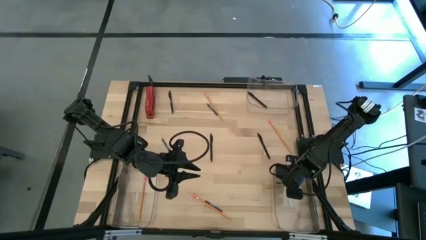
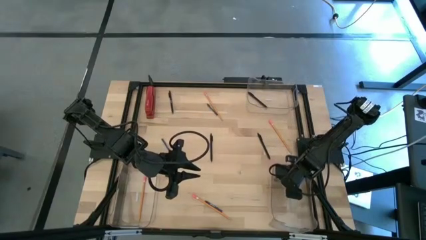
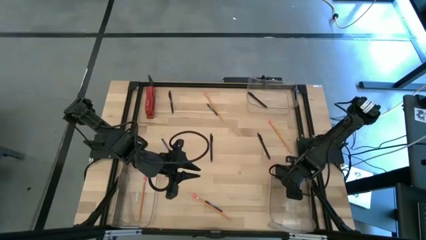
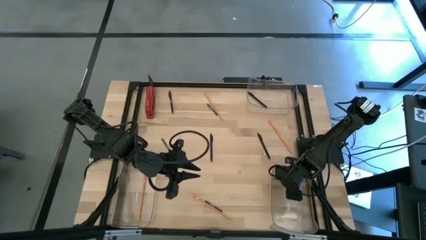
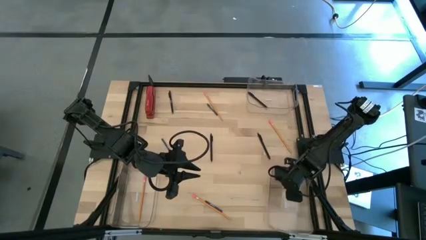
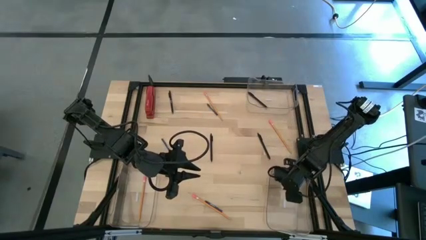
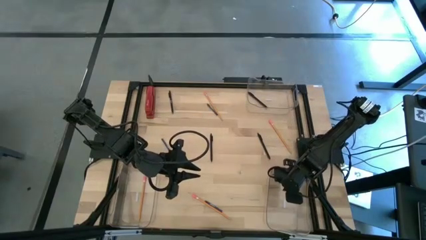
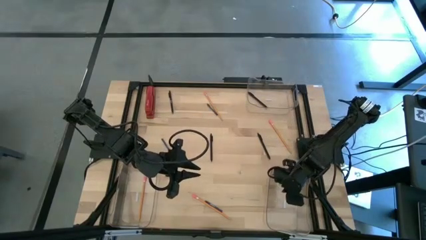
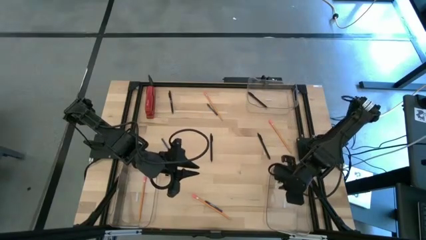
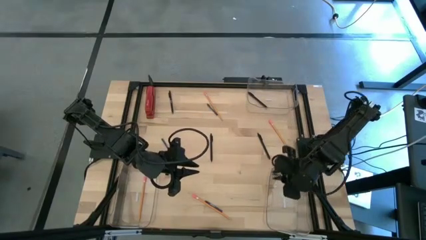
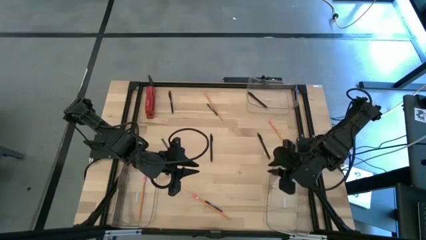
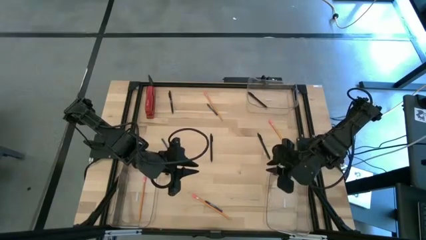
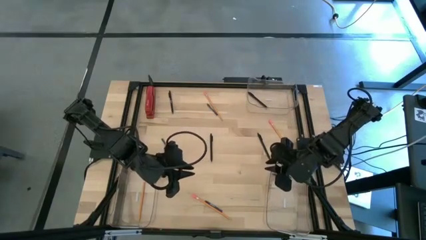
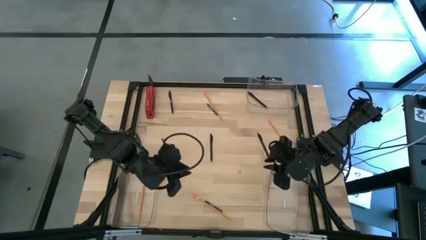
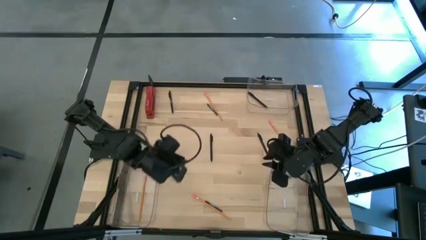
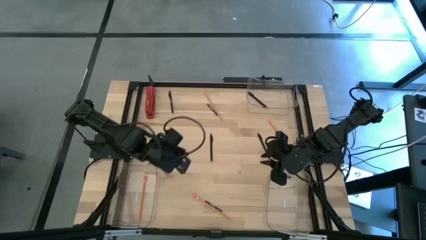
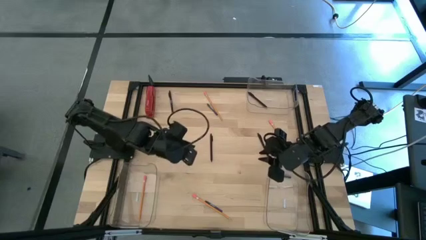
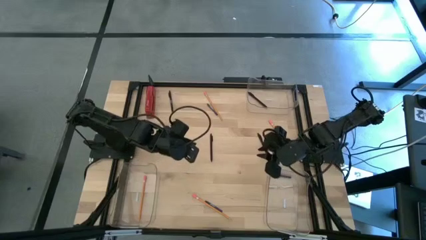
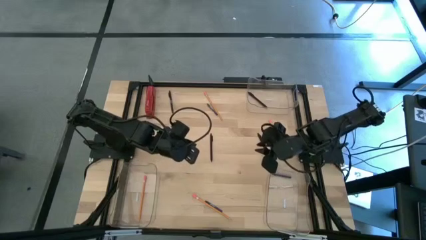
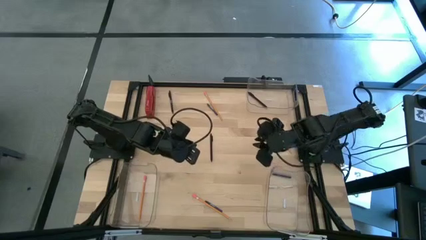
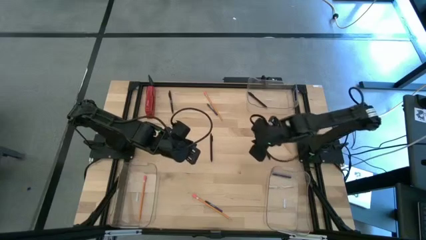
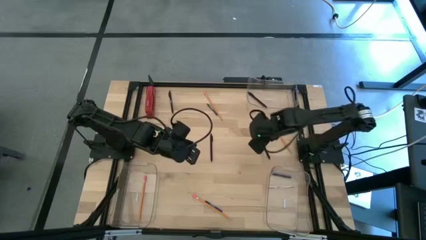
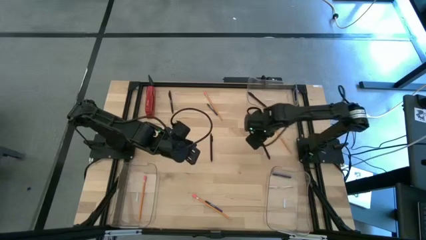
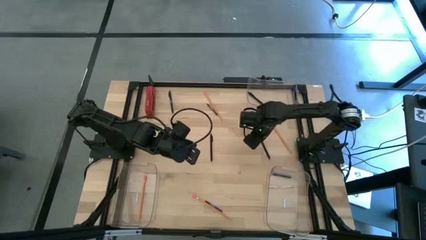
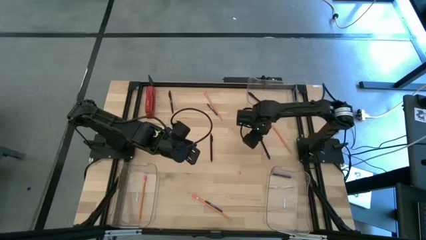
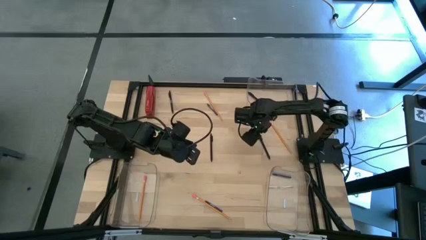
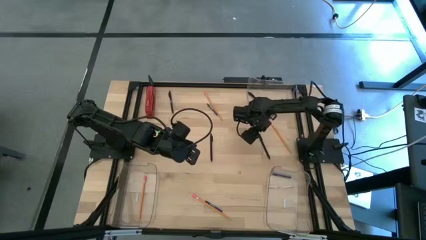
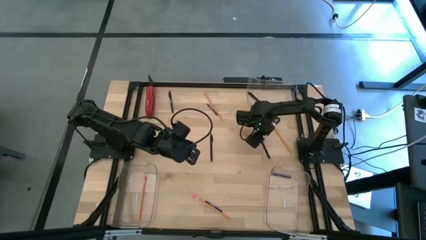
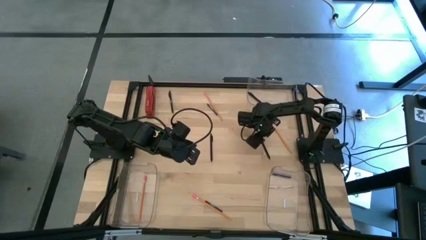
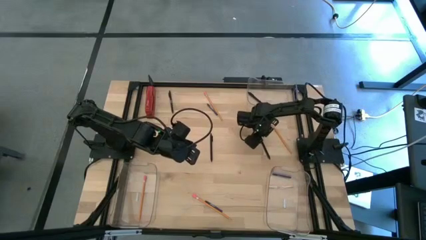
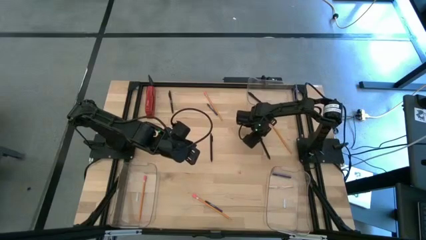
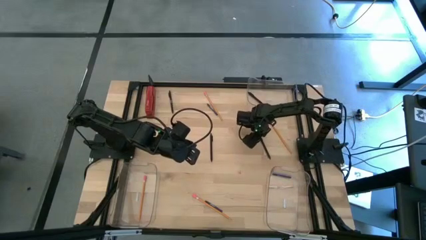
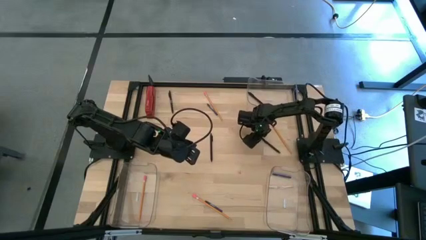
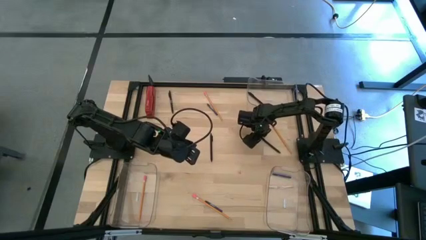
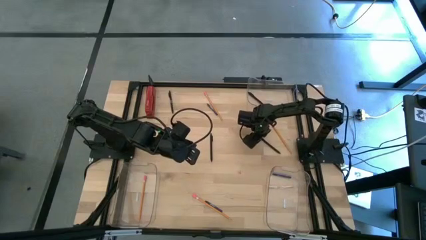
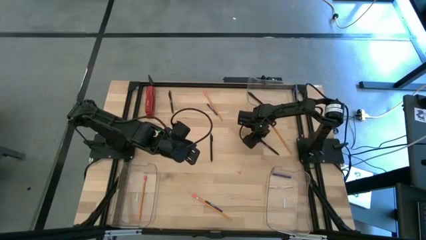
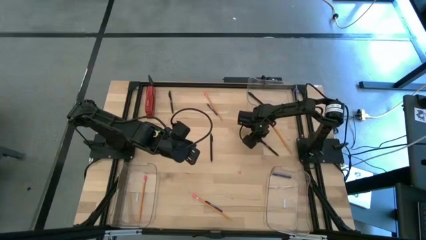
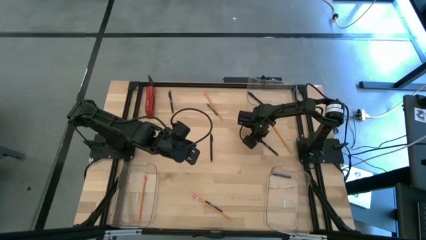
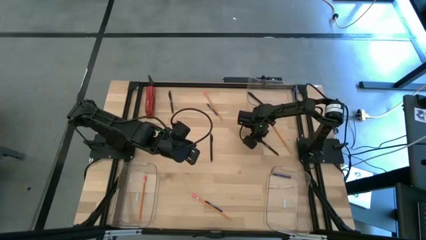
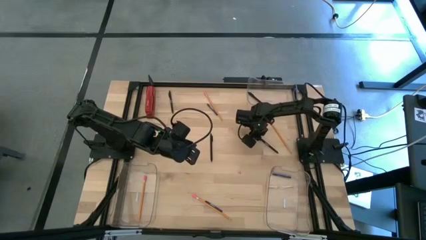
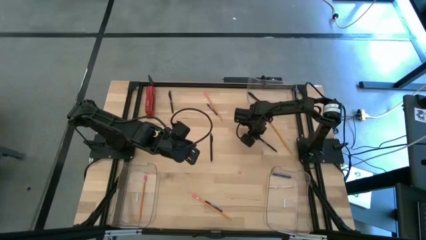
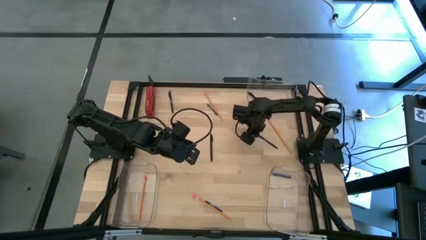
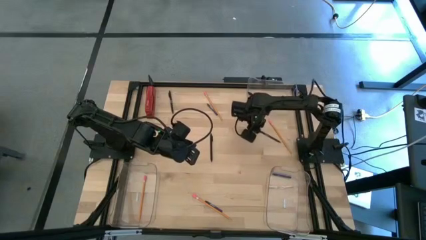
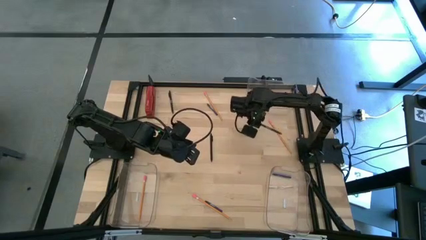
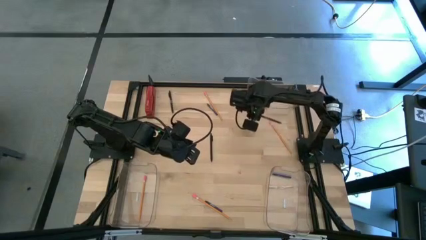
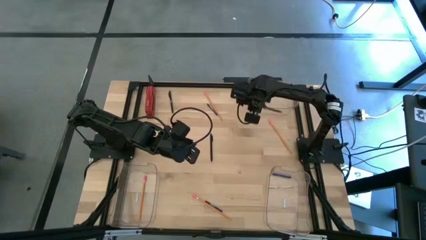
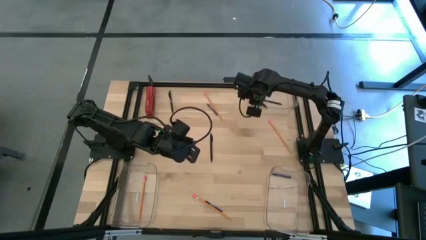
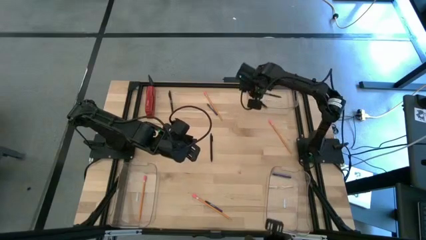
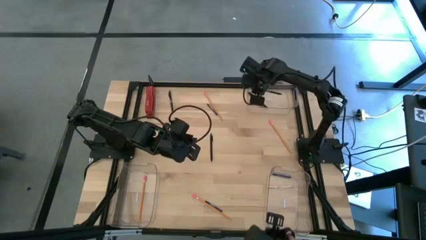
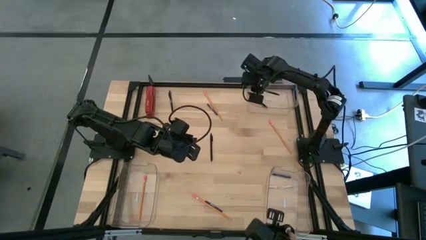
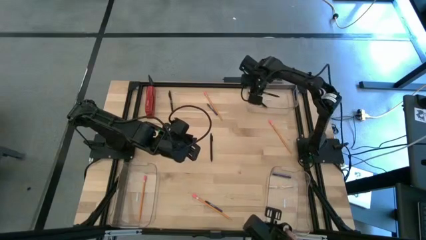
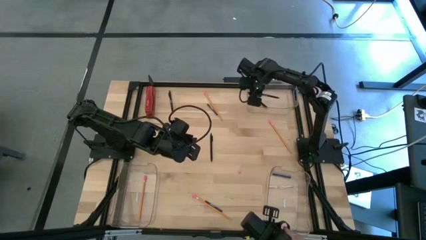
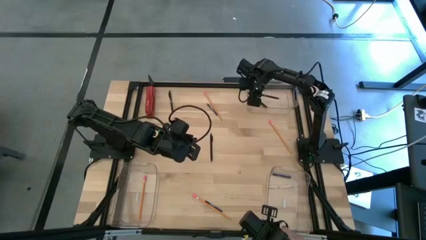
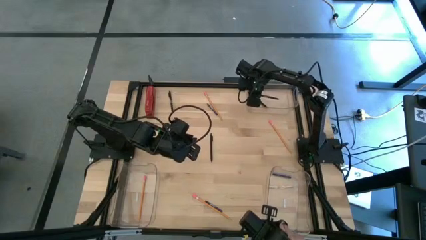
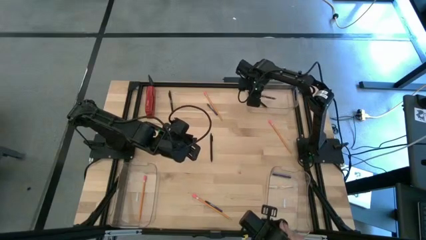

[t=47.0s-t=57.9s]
Task: Sort crayons/erasers/pens/pencils in bins
Put the black pen into the top transparent bin

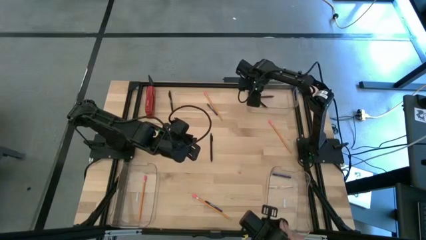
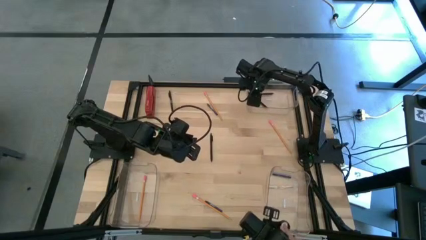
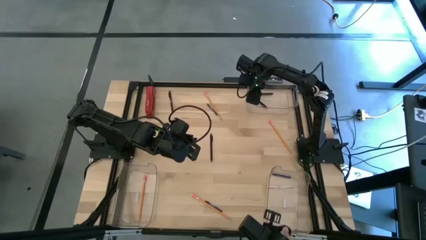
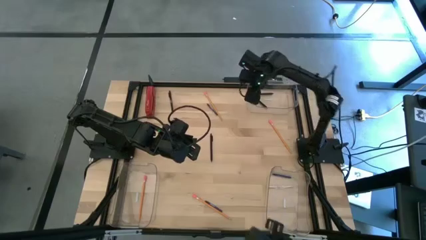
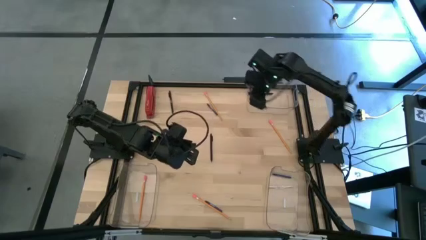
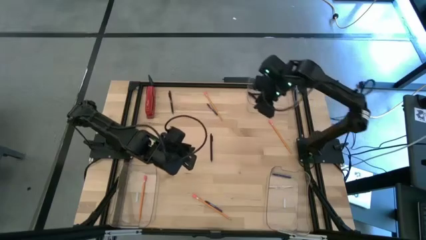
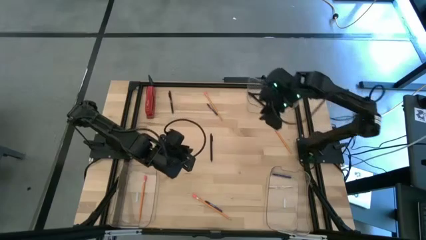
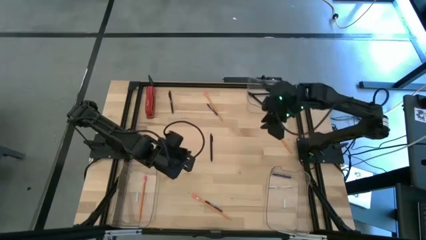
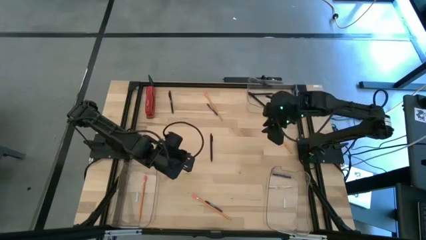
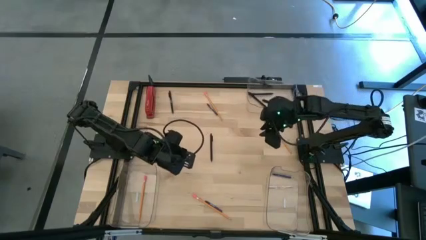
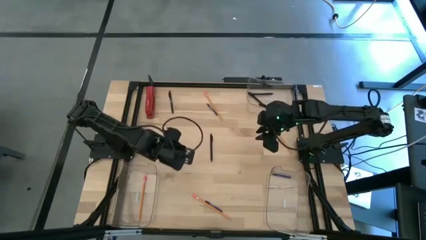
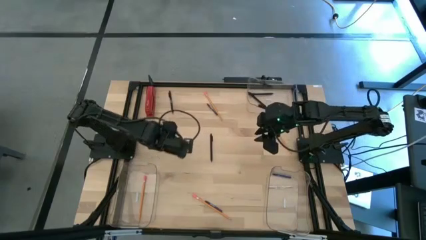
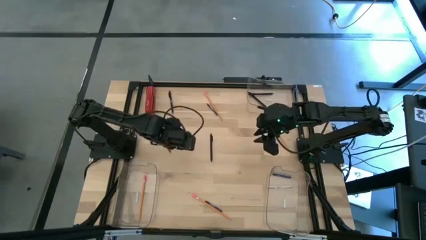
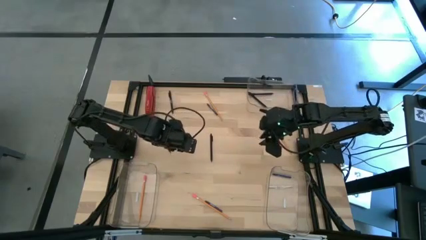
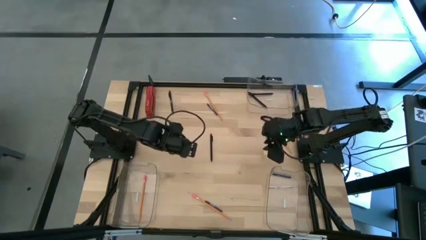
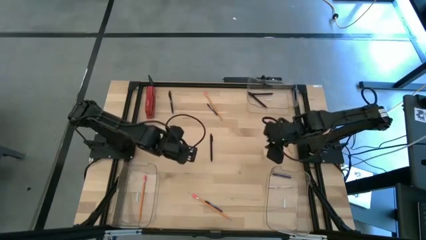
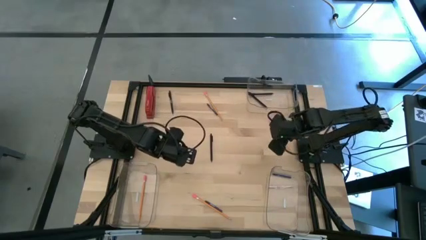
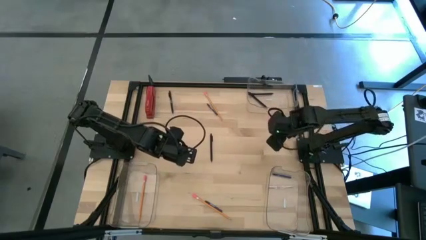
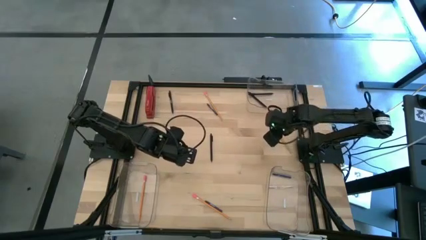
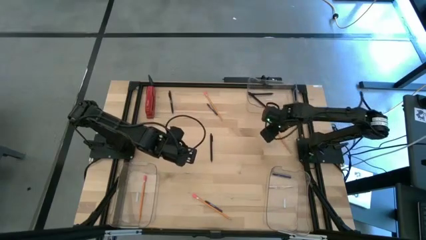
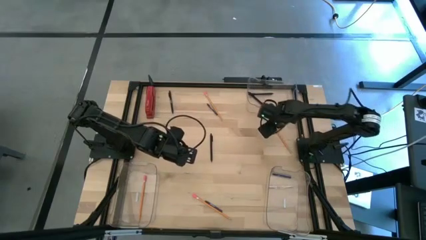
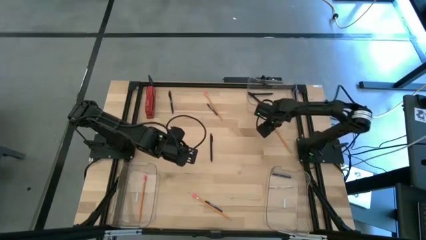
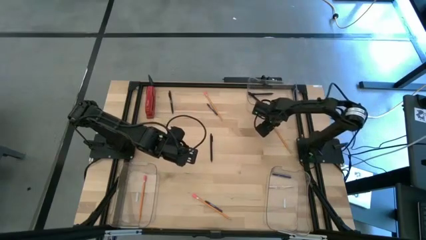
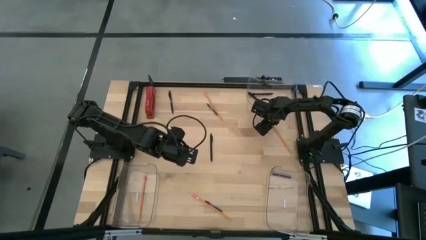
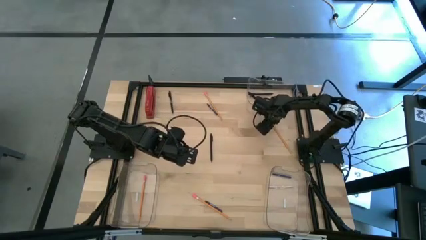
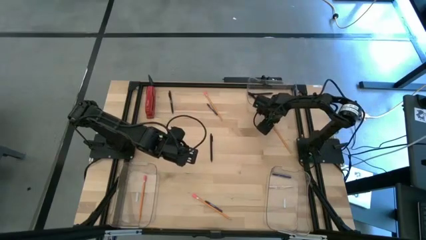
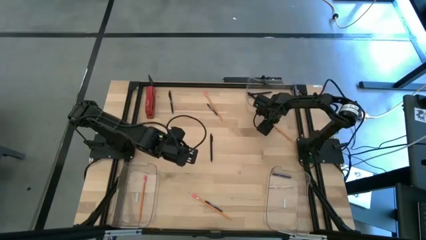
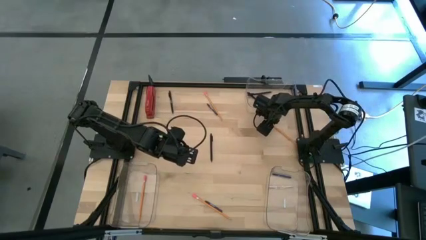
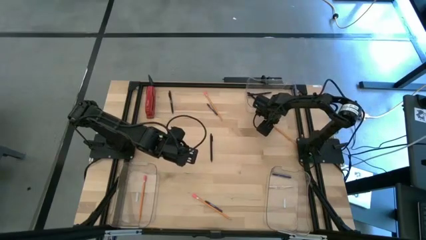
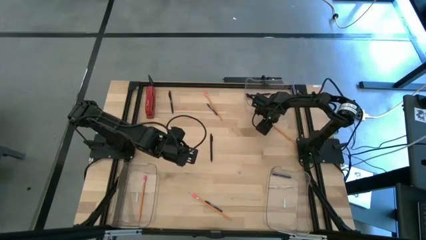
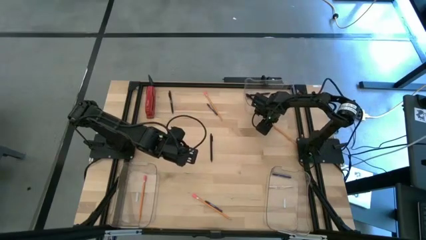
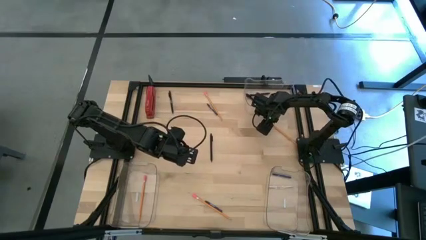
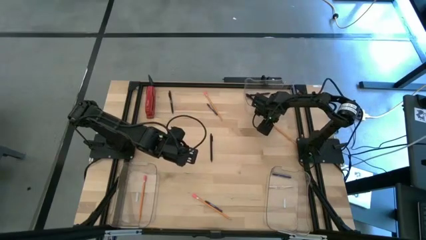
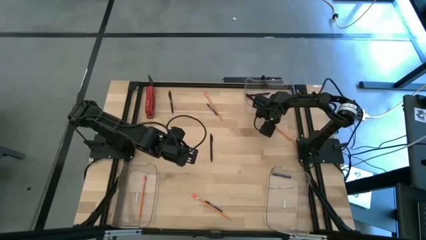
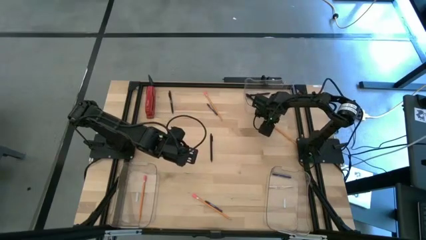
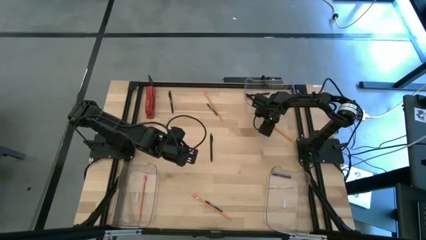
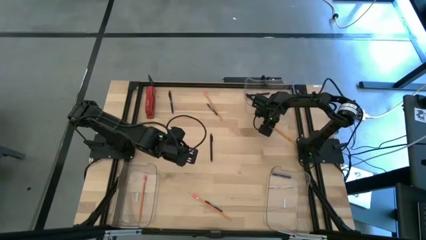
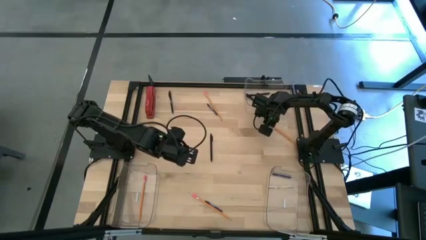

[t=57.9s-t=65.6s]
Put the yellow pencil into the bottom left transparent bin
